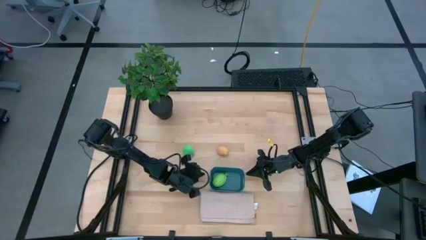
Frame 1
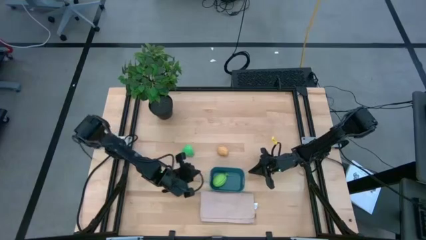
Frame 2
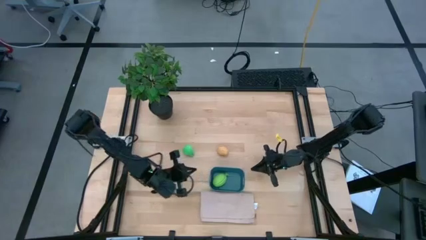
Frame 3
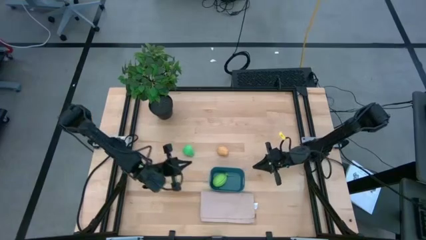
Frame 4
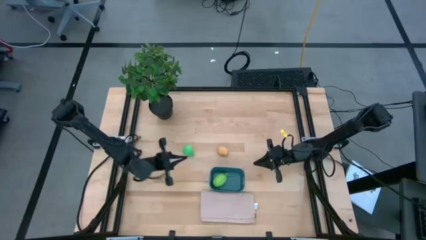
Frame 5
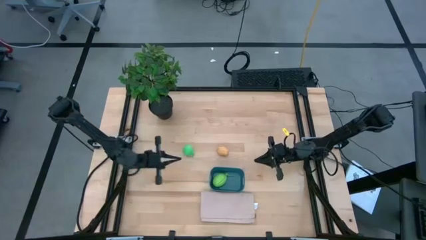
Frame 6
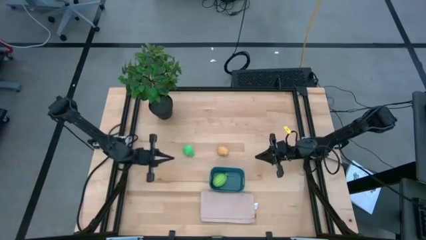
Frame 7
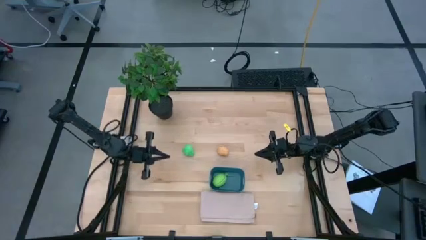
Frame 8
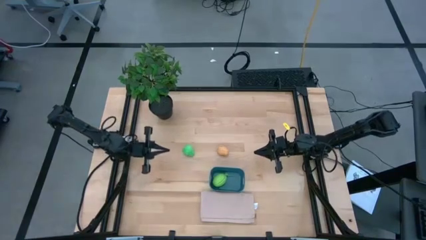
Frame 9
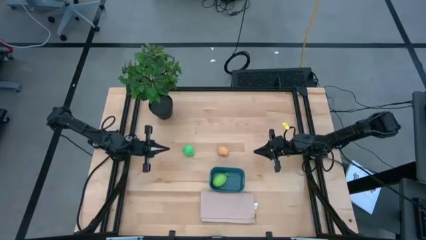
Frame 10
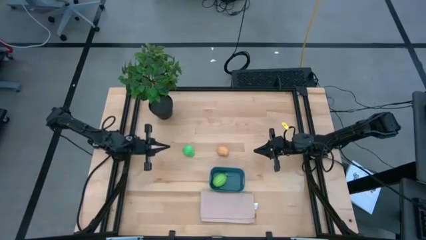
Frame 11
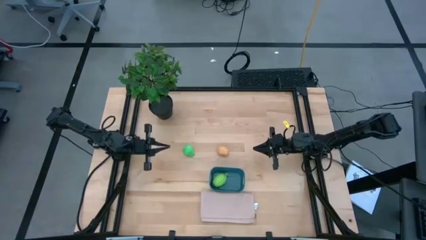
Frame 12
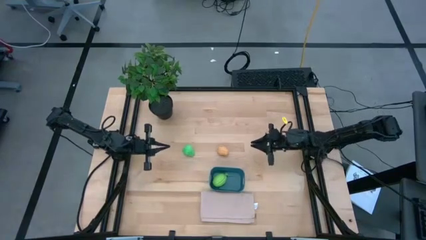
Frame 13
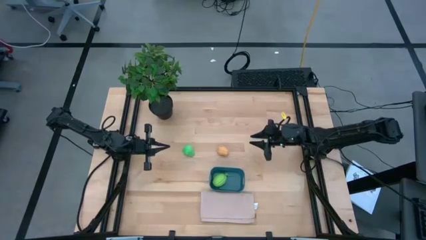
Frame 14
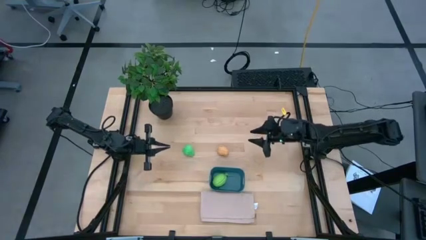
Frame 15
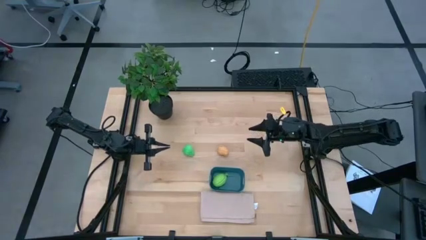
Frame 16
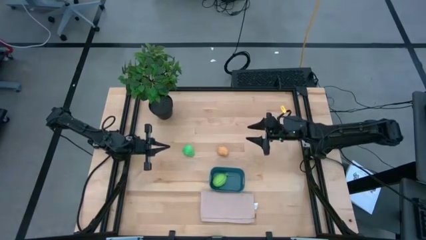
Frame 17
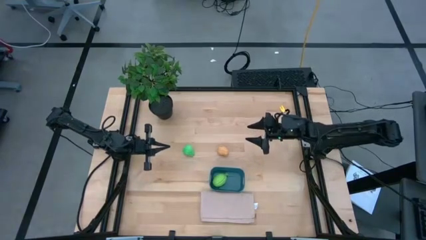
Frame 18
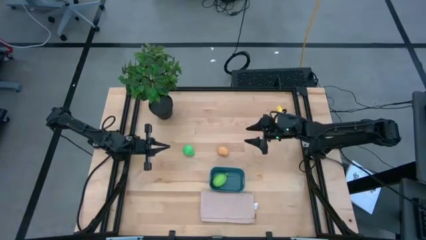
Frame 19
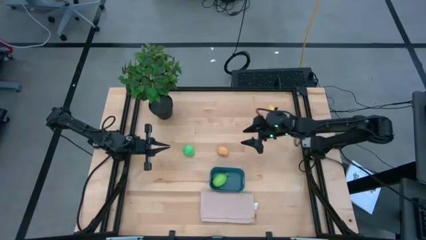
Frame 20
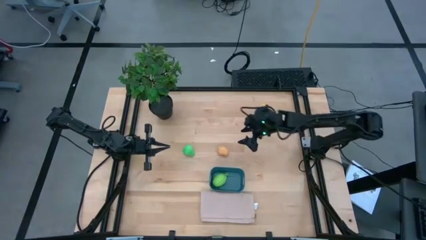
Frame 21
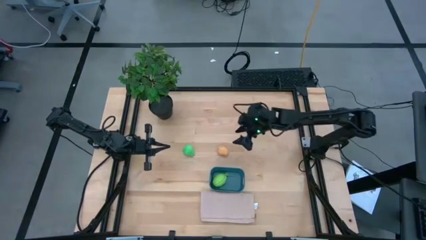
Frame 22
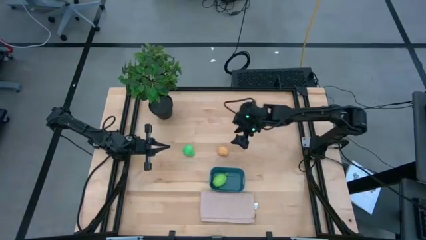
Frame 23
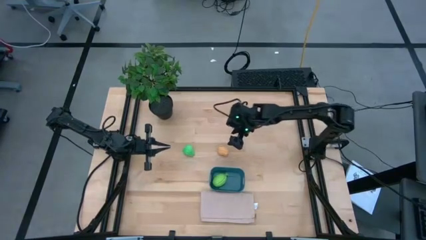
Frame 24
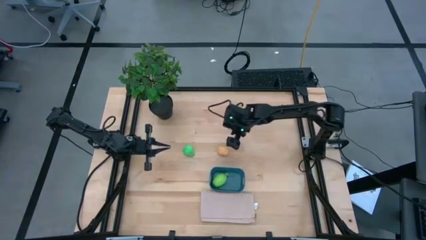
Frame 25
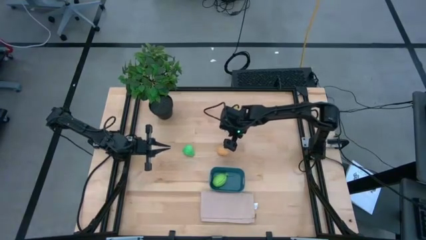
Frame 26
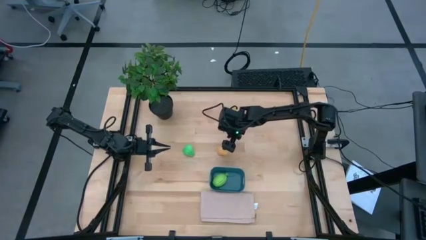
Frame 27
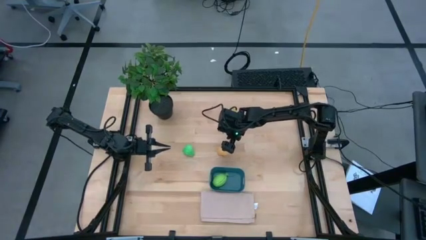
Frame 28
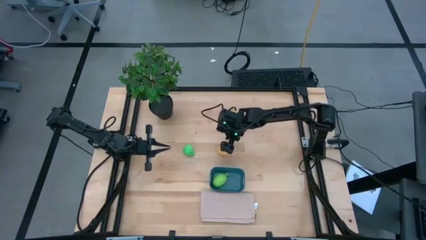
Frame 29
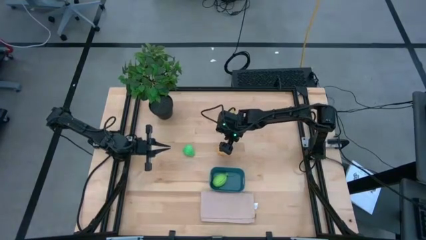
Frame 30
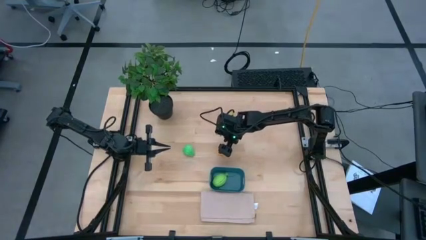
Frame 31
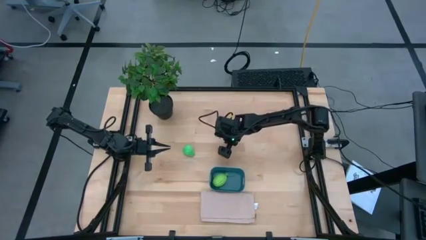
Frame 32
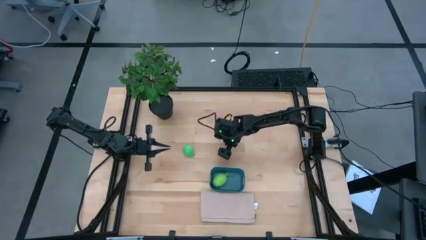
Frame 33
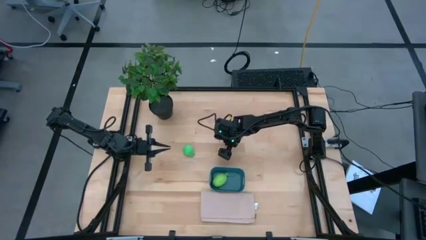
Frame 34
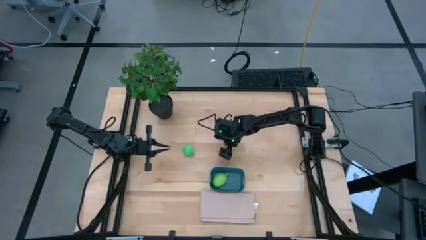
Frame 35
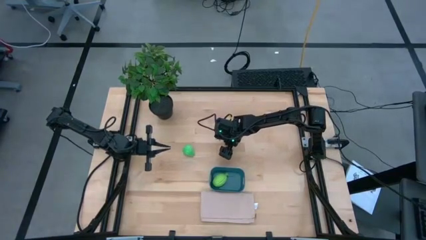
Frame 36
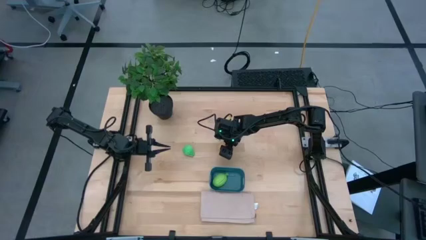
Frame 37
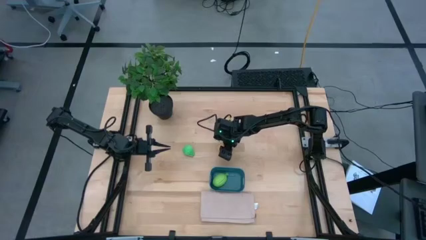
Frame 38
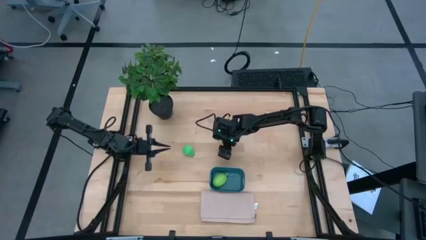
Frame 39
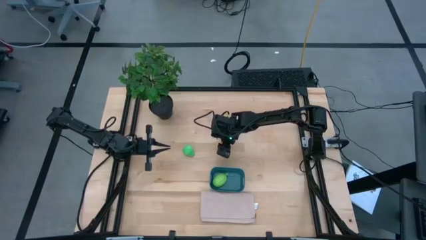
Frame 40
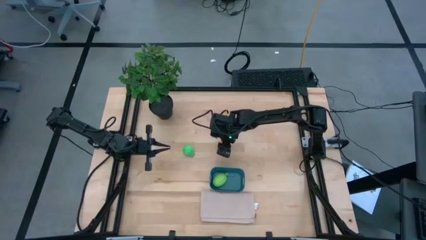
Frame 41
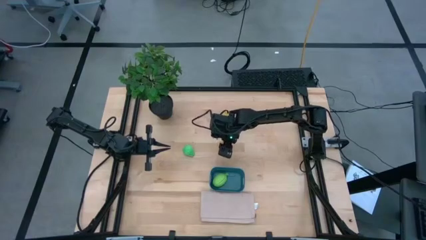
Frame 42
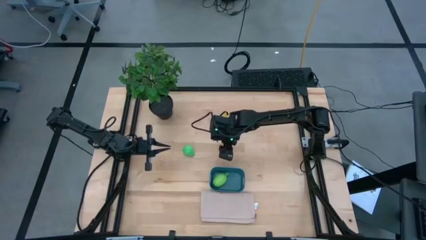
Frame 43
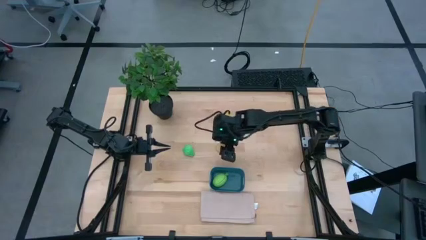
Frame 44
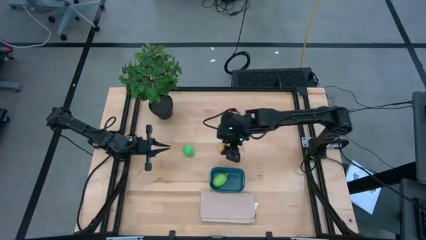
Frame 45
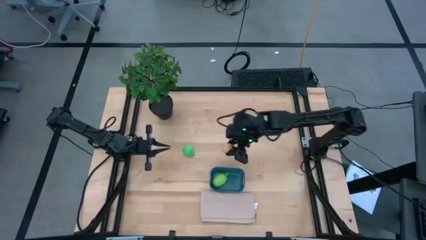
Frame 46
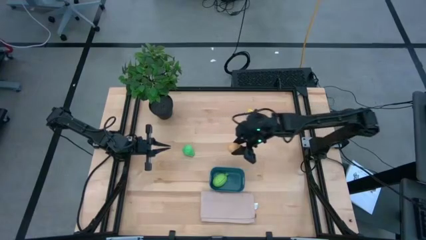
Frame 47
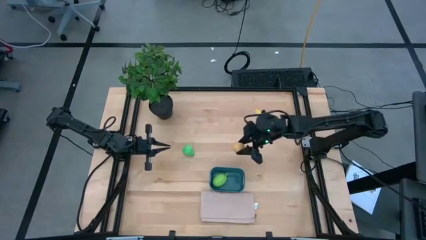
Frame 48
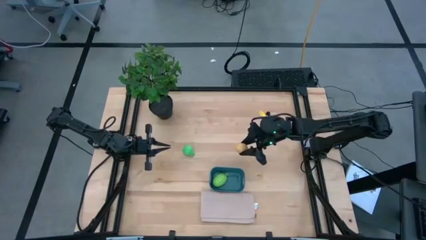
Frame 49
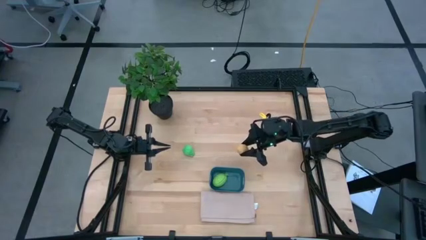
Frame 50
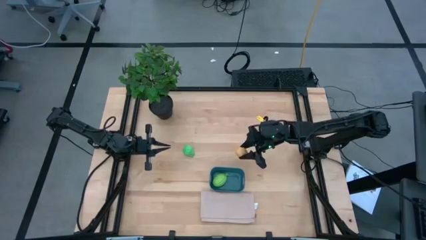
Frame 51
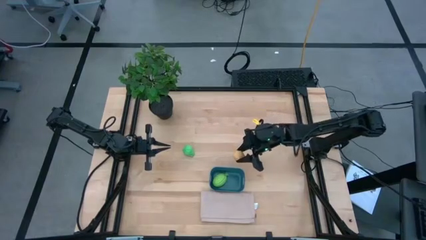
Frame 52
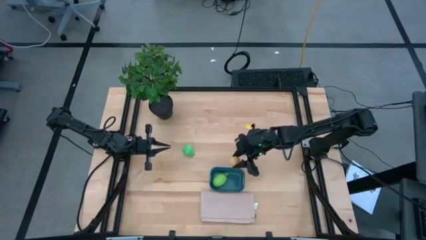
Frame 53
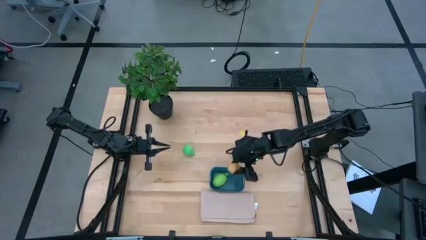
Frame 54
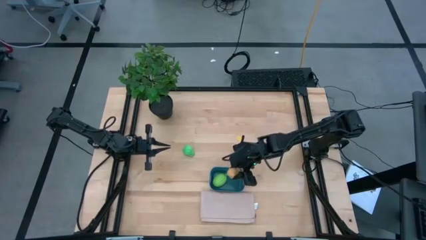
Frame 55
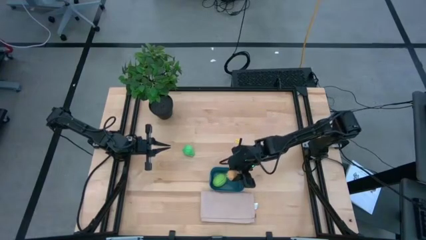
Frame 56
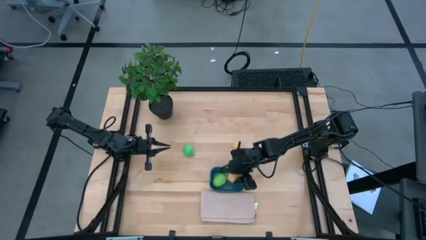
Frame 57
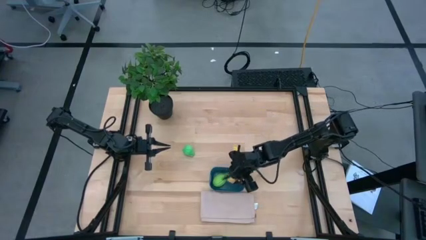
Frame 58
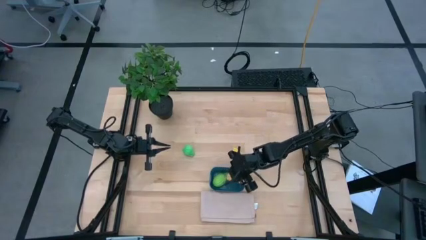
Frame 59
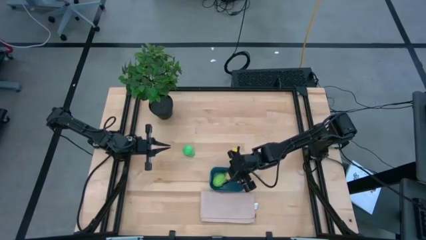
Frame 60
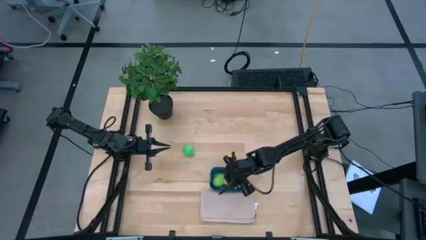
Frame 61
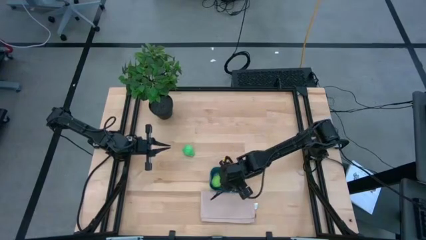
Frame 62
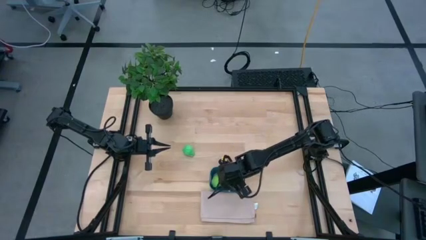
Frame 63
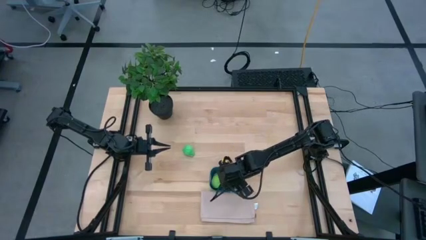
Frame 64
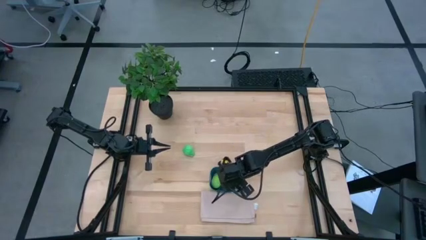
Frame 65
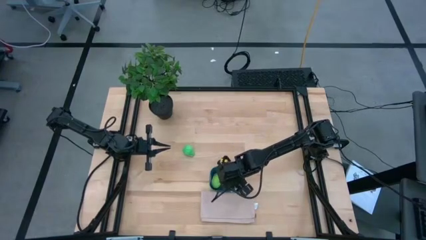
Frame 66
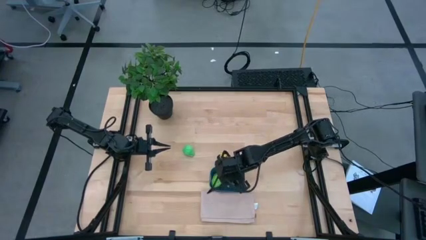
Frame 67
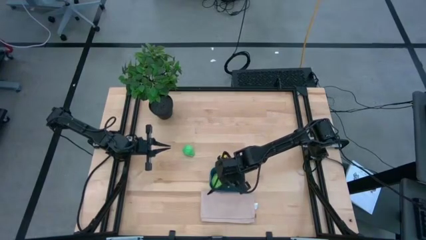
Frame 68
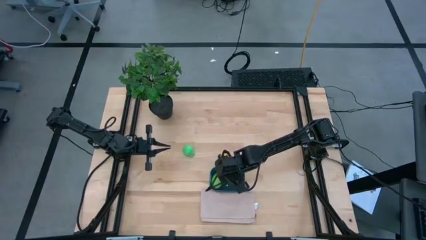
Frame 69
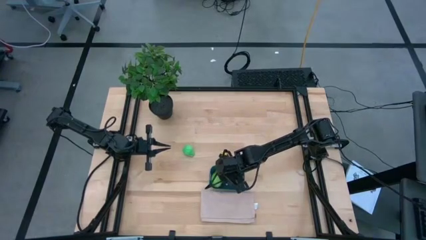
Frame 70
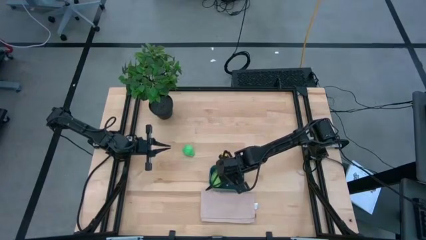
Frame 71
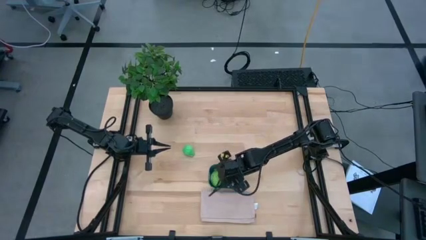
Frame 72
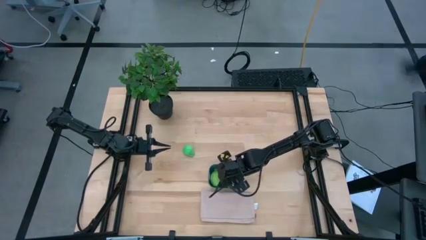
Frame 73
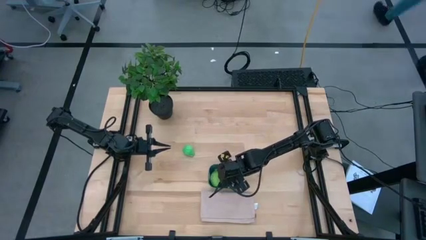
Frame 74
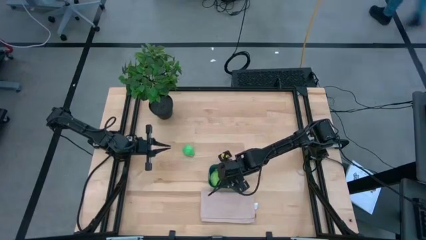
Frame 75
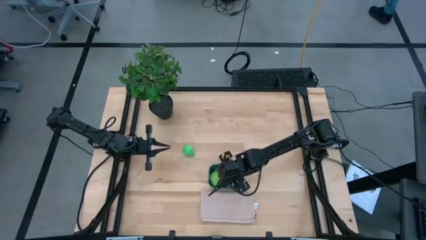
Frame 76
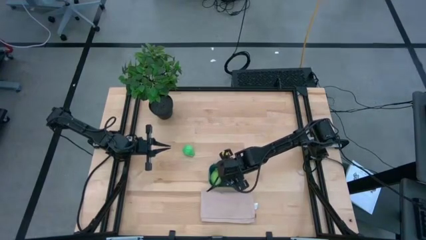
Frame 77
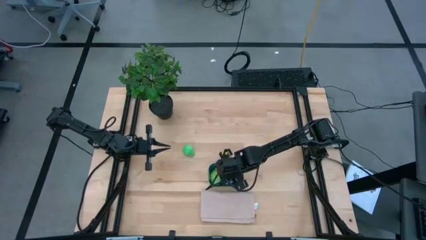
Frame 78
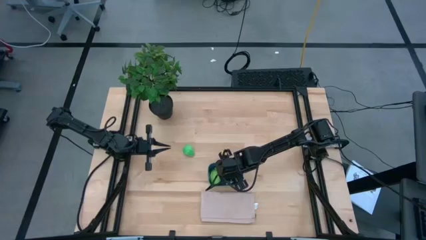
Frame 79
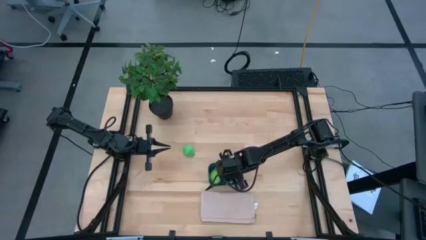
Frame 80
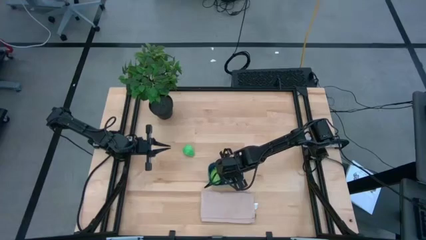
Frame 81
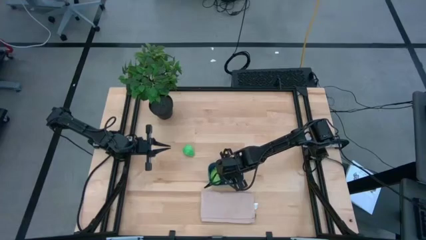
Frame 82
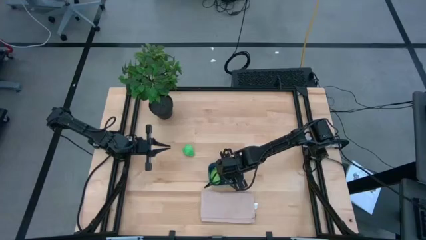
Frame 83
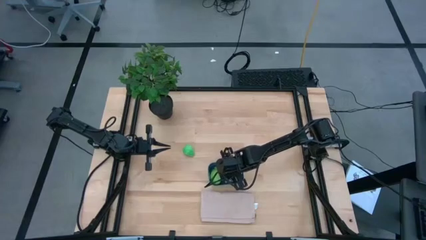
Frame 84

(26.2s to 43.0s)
Task: Pick and placing Produce into tupperware
Put the brown potato into the blue bin

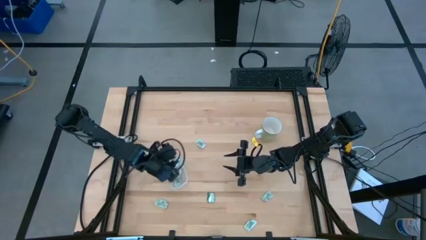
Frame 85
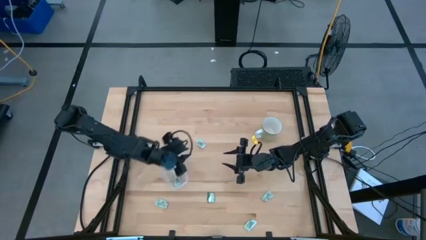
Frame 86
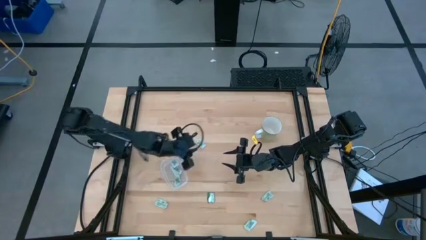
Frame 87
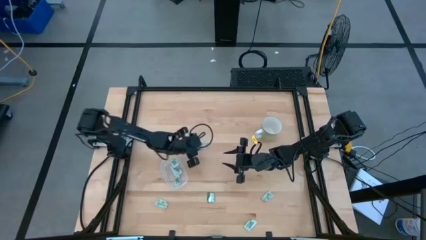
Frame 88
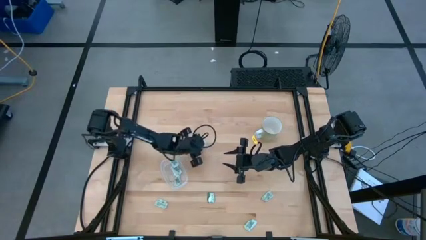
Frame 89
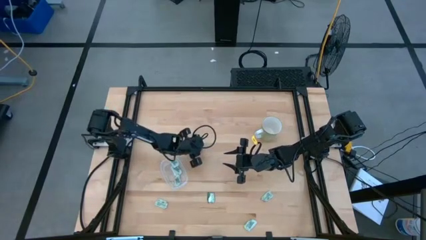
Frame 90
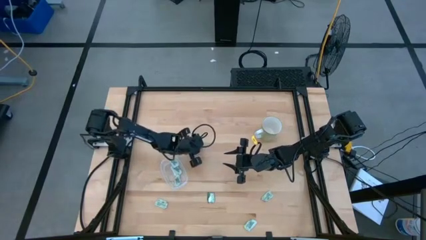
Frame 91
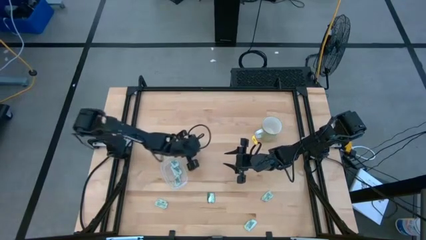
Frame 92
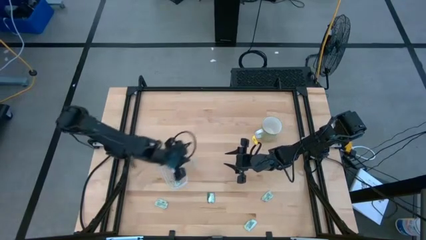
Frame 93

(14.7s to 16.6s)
Task: Pick and place Stevia / Truvia into bins
Put the green stevia packet into the transparent bin
